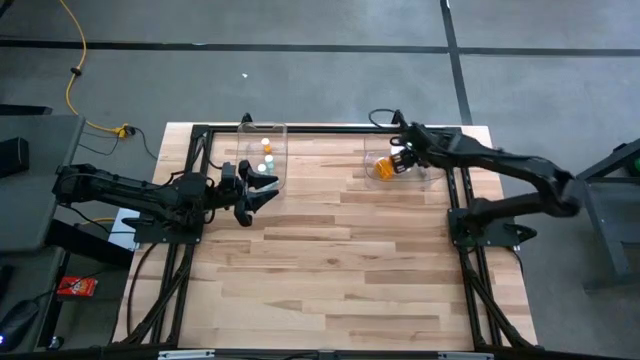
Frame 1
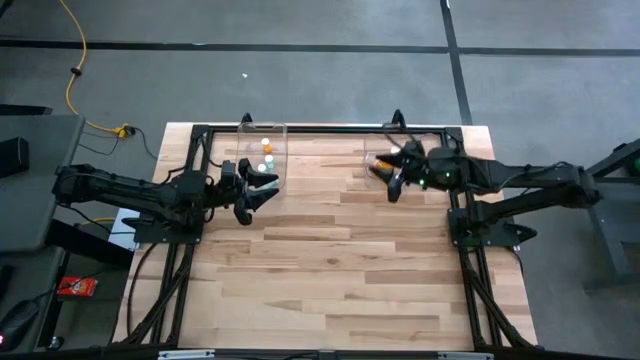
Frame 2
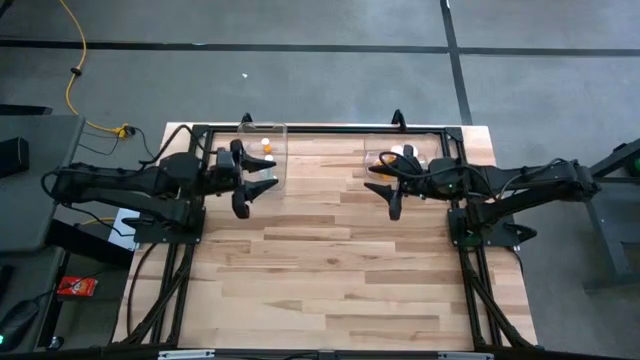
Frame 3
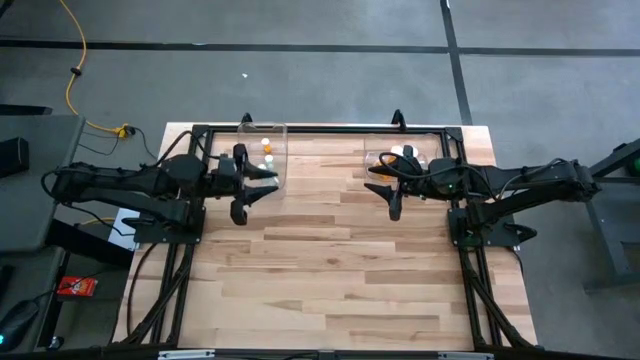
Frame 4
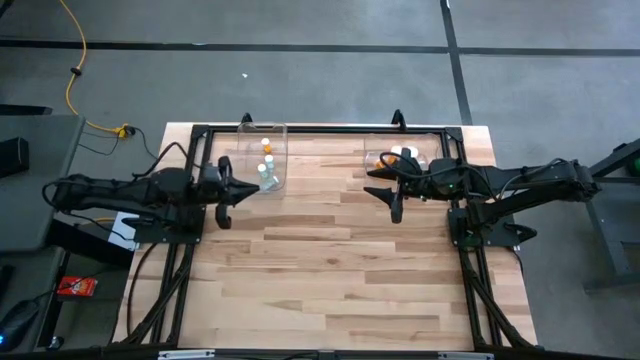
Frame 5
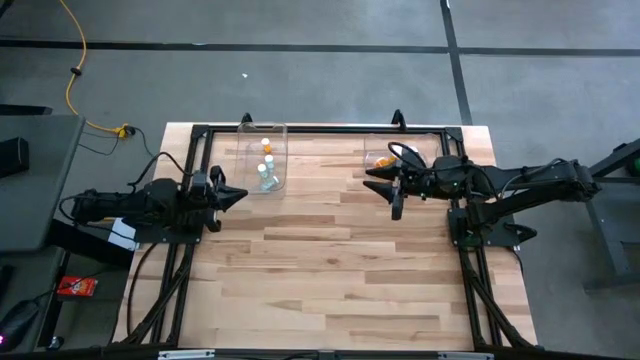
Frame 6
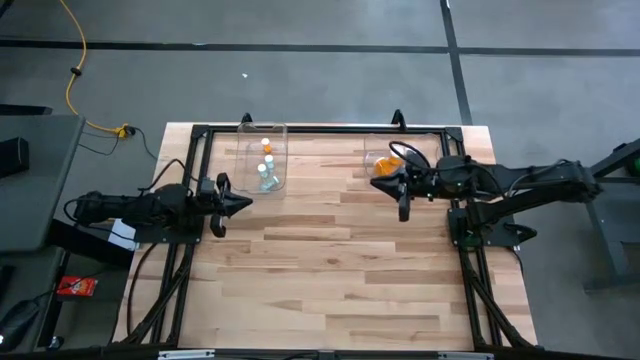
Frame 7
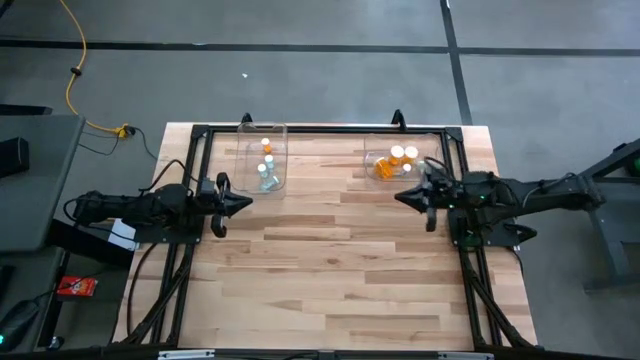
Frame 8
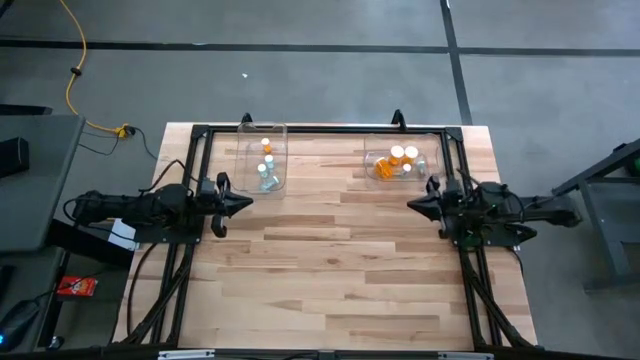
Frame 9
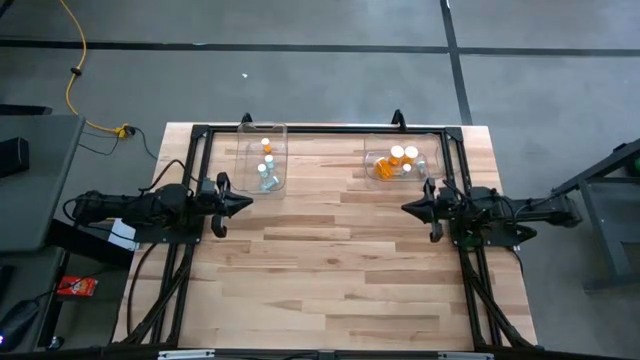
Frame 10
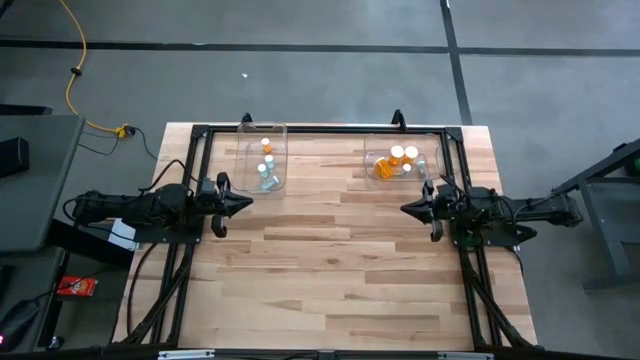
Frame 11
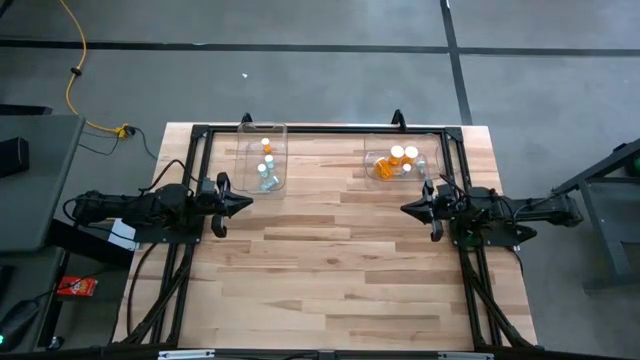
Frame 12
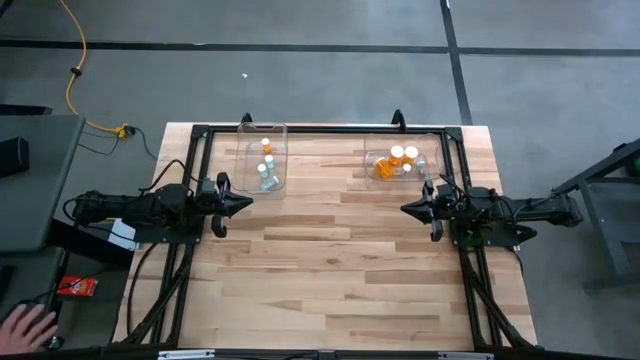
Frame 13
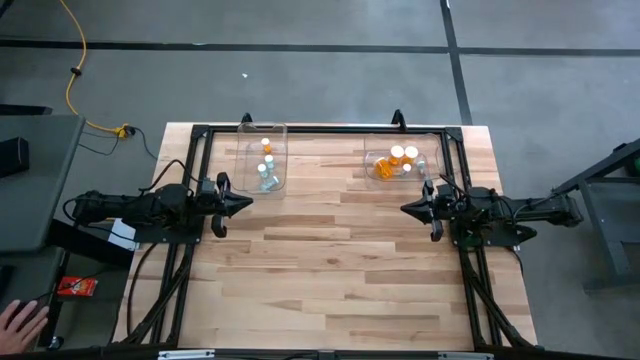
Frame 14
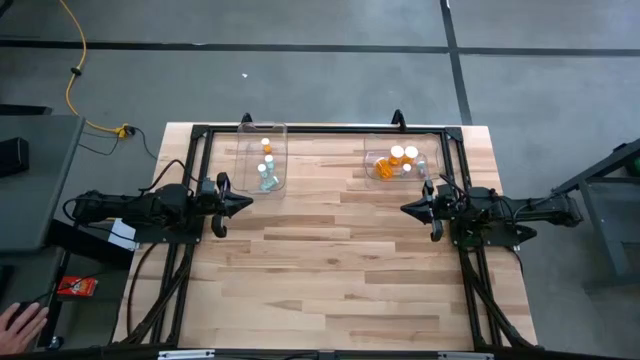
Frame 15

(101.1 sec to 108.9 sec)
Task: Pick and place medicine bottles into bin by pill shape (circle, oval)
Return to Home Position

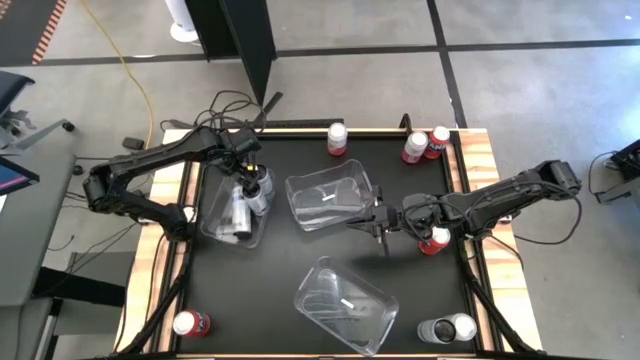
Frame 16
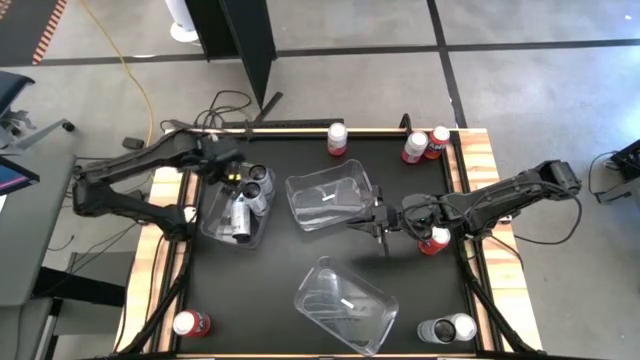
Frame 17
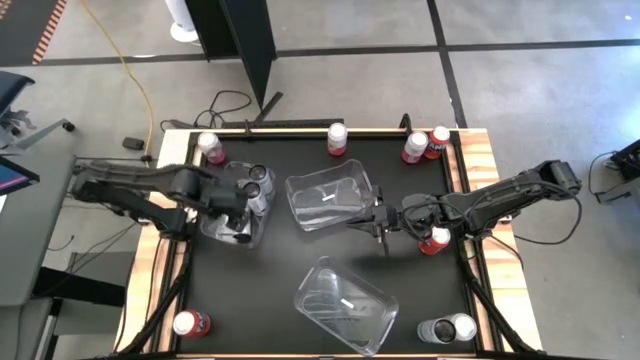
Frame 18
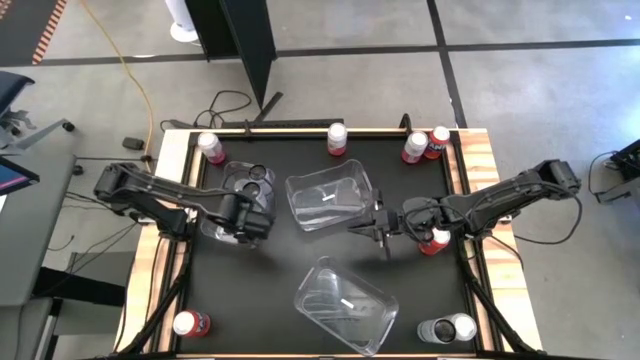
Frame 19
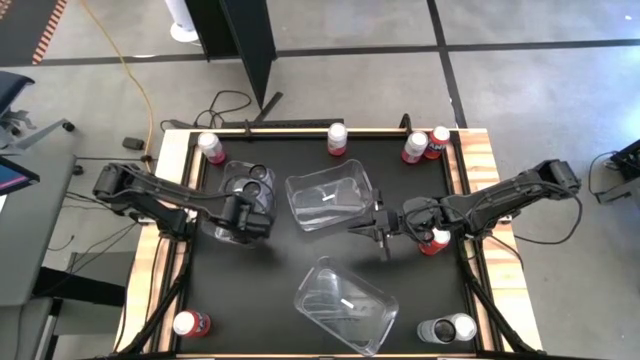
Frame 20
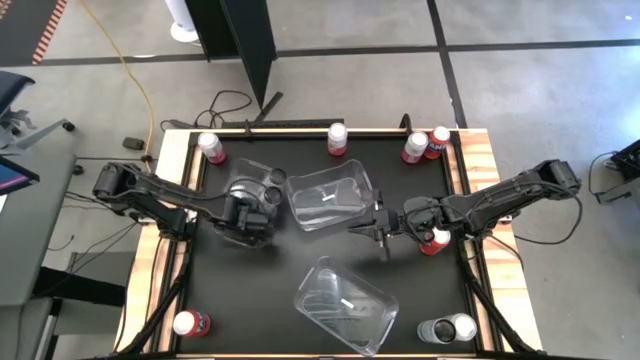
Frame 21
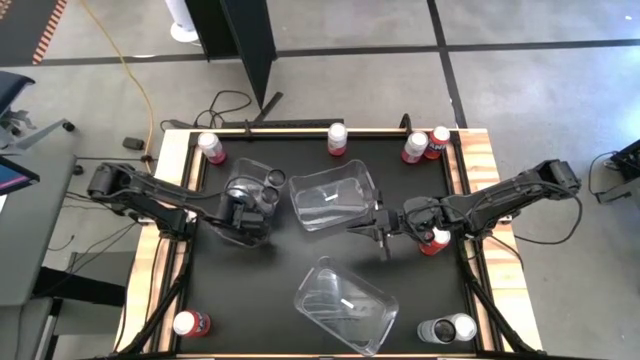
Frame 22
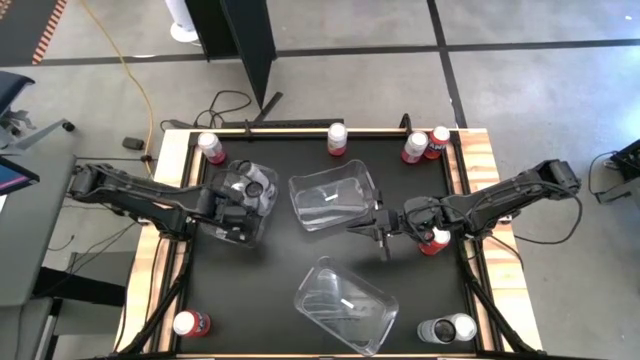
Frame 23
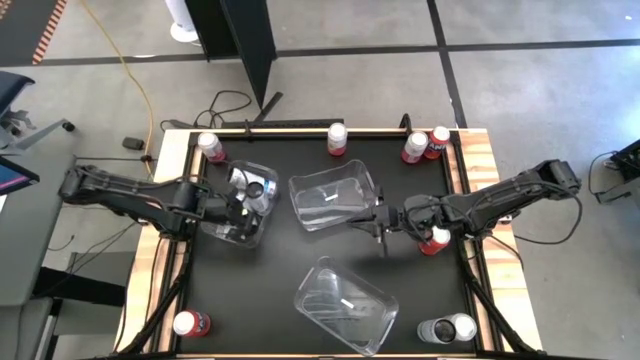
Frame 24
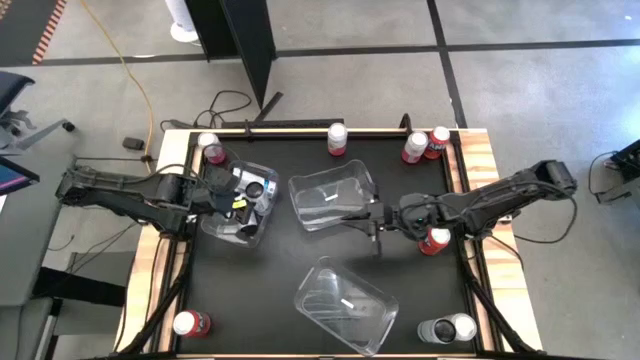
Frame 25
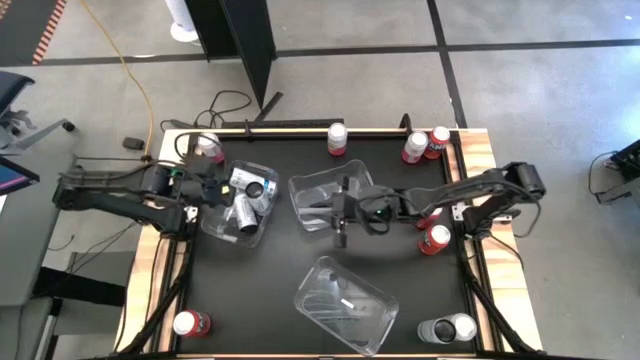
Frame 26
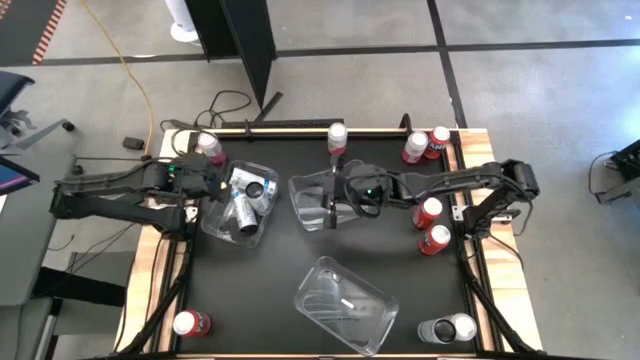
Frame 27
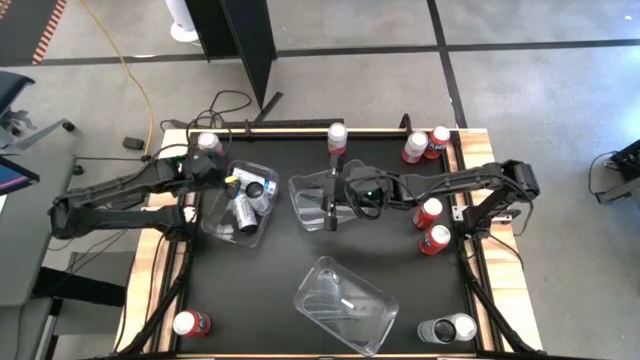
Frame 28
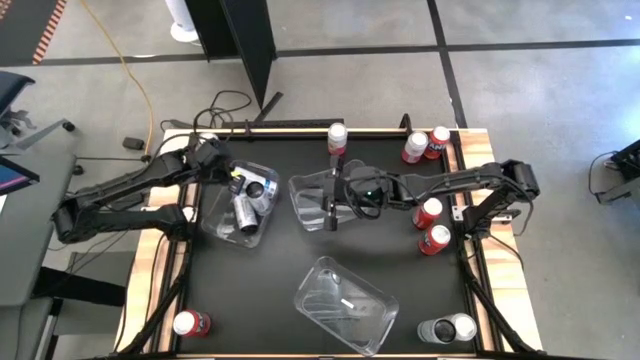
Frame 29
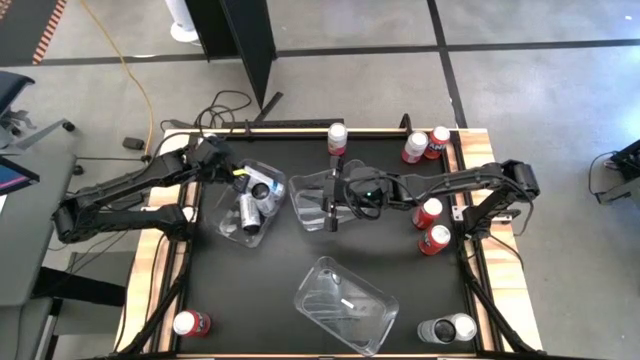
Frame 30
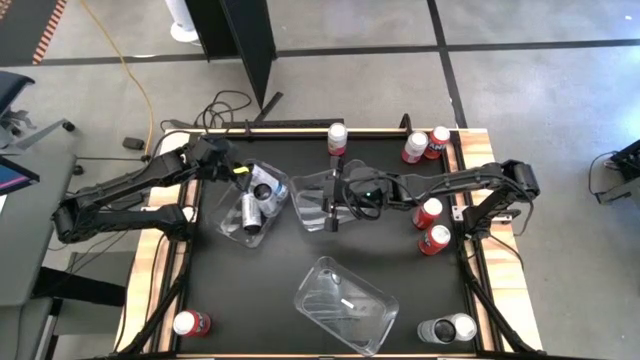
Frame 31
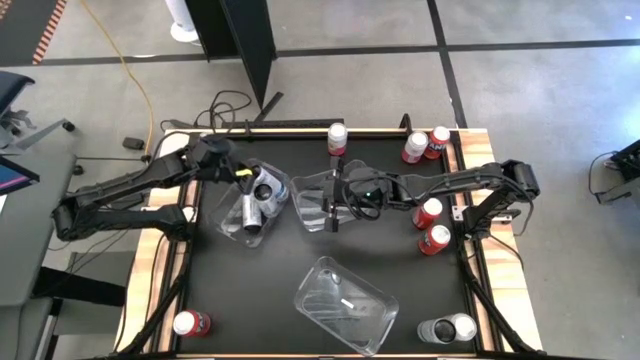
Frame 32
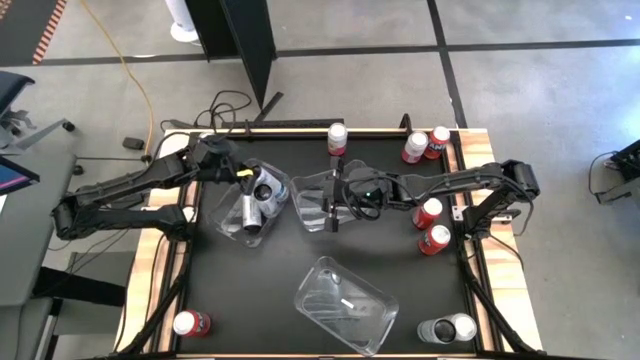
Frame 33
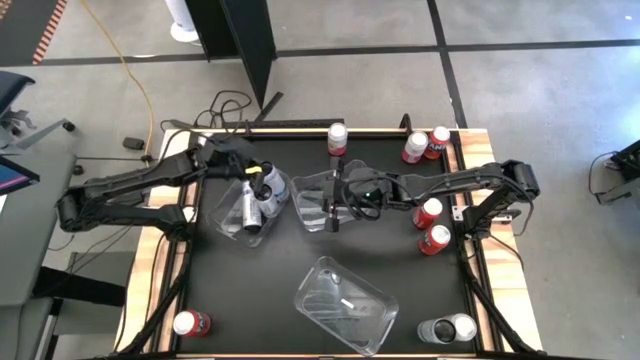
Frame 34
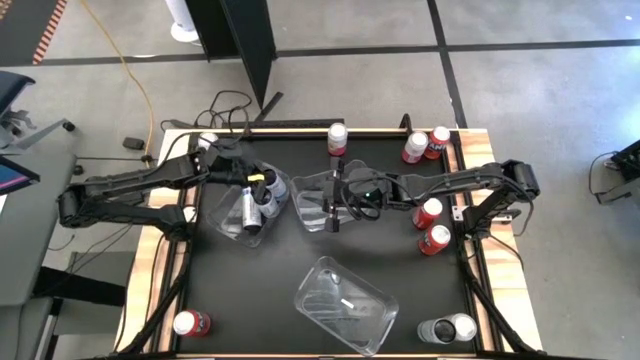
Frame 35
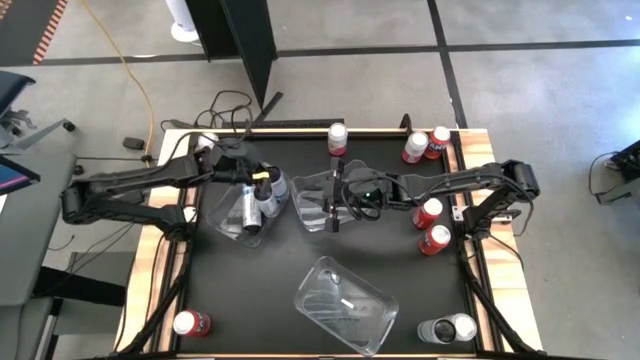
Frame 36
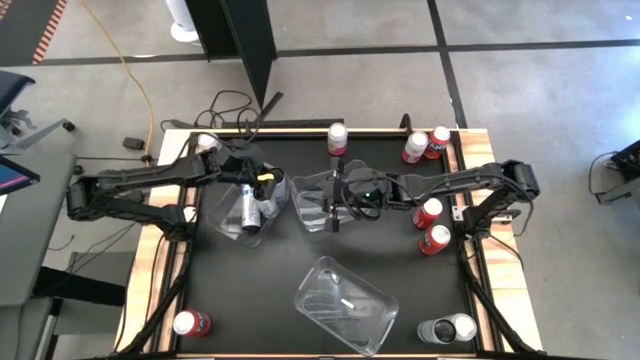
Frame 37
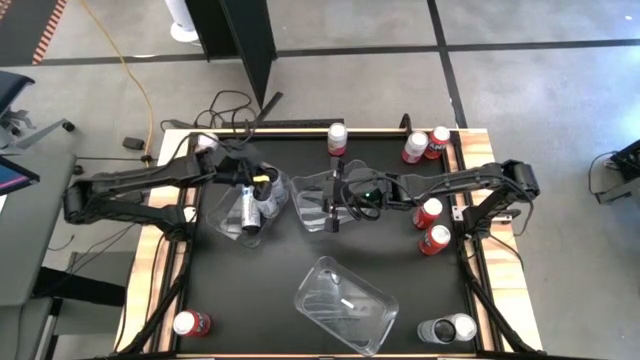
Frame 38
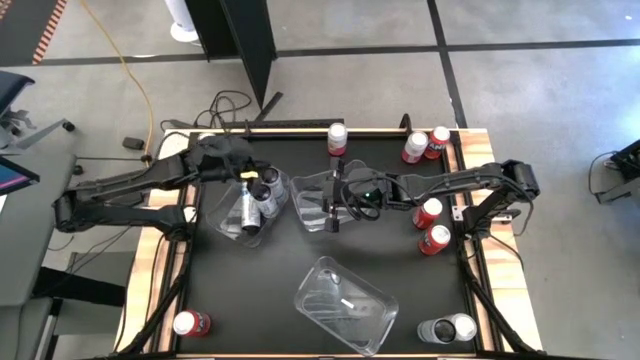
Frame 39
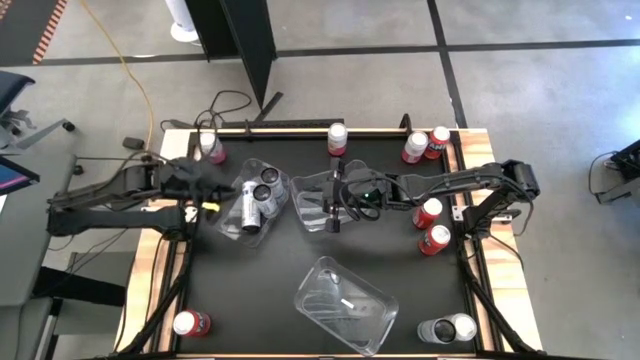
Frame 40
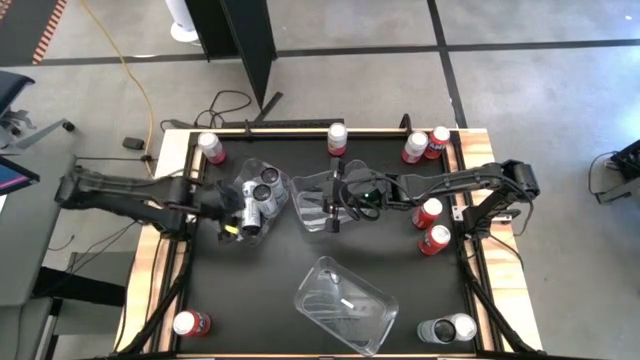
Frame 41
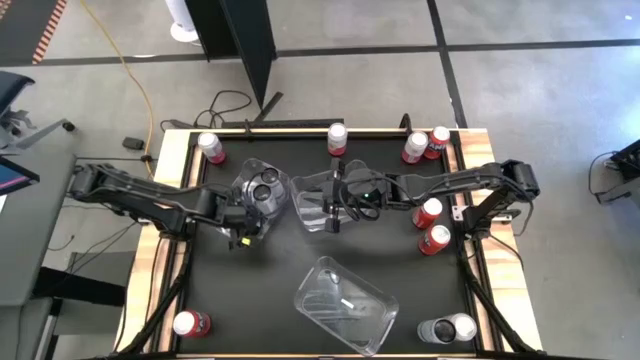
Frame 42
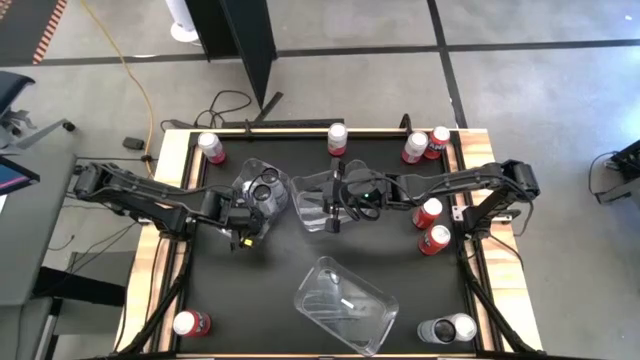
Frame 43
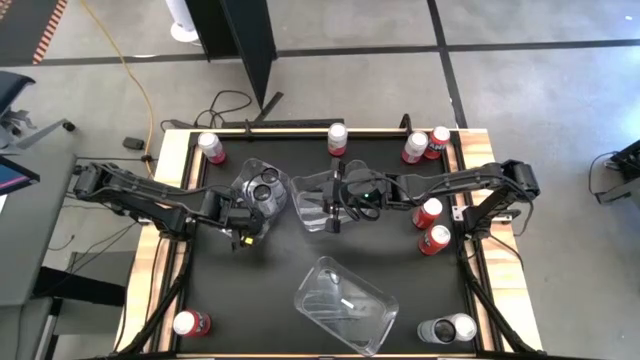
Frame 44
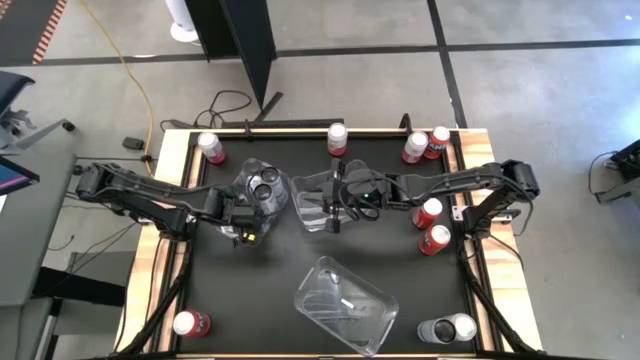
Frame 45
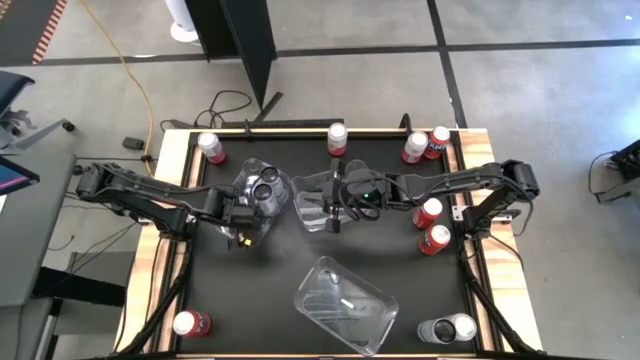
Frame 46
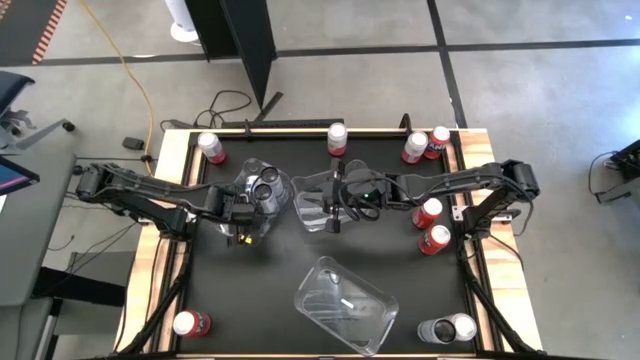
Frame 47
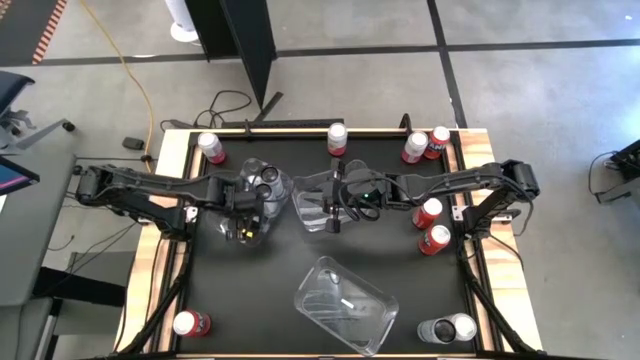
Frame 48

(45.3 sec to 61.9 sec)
Task: Sort soda cans
Put the left black soda can in the top left transparent bin
